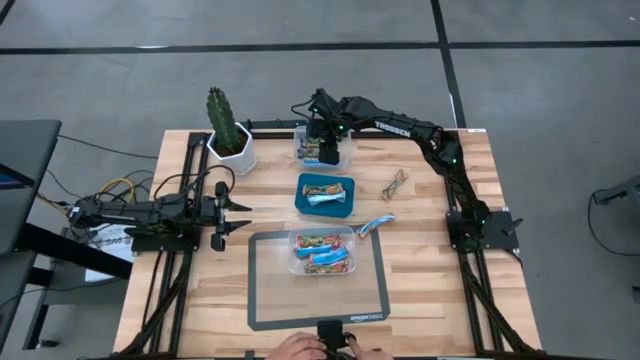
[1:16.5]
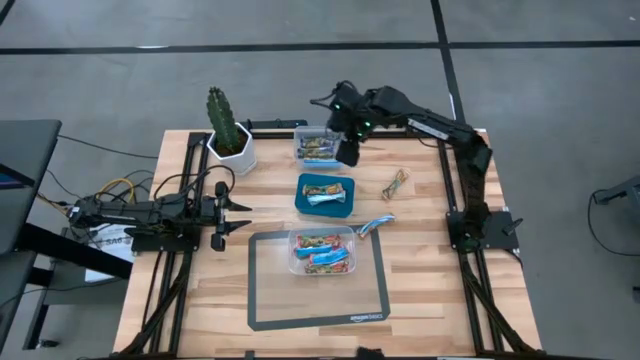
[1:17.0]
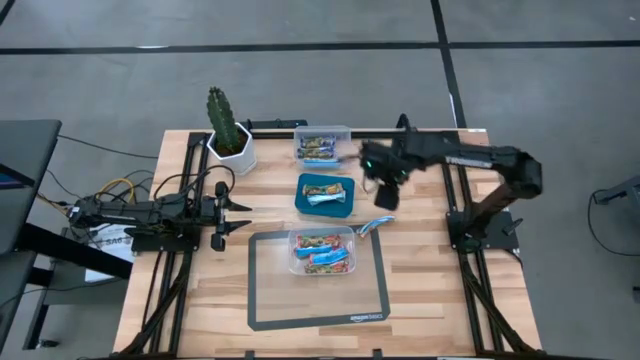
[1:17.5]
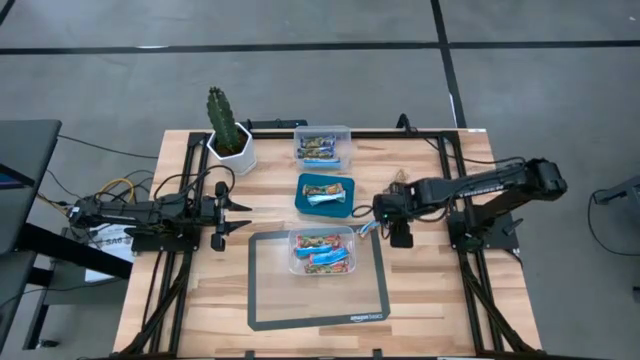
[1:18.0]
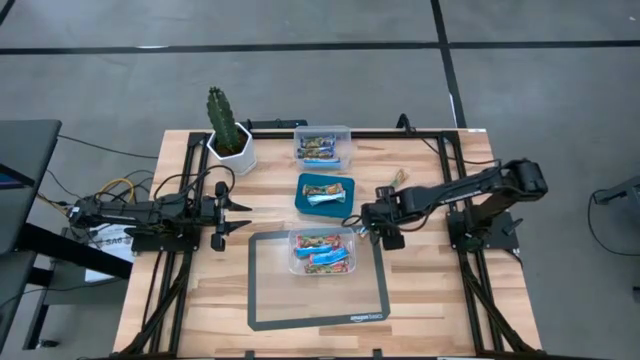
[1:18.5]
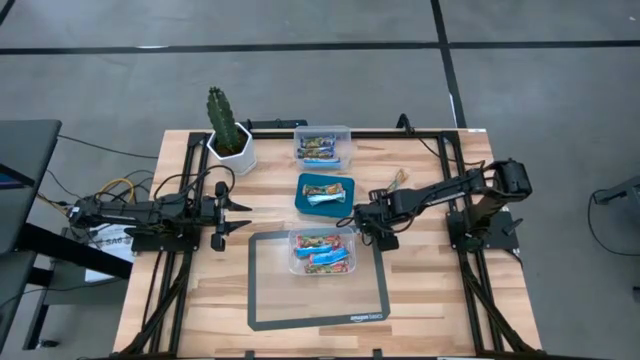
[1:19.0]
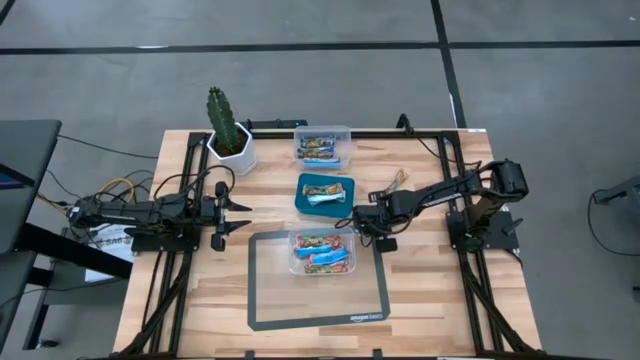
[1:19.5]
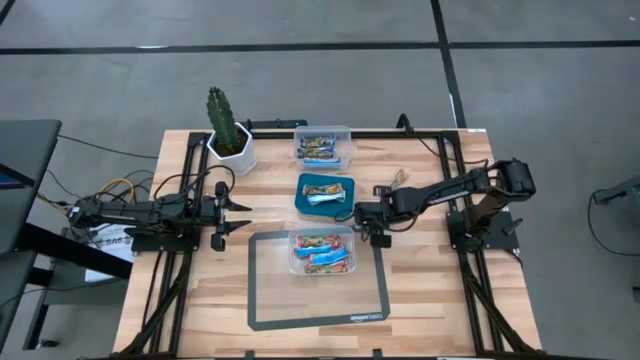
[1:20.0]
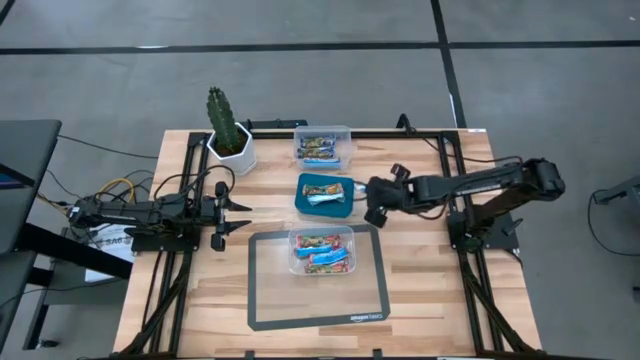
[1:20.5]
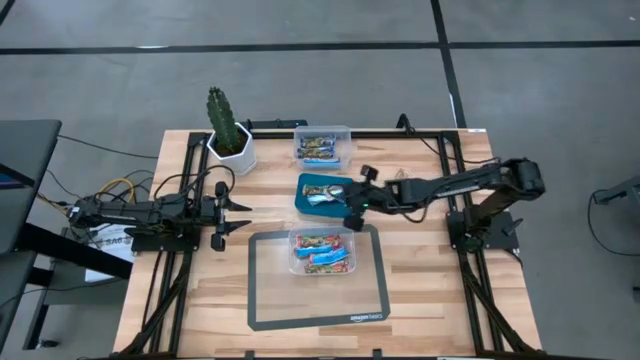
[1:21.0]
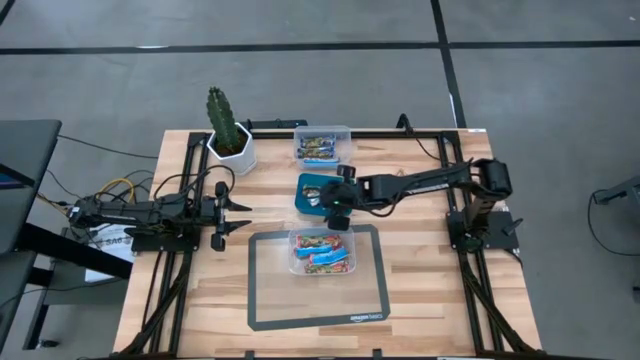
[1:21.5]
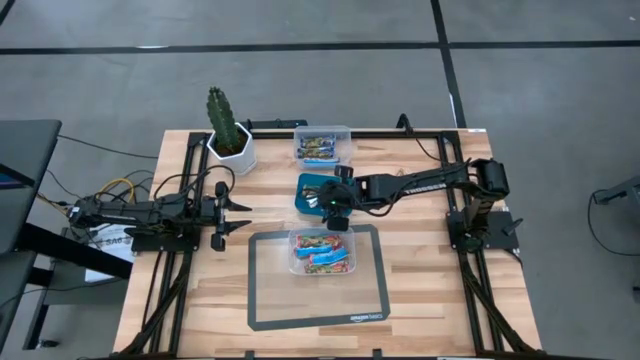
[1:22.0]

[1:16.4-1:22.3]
Task: Pick and place Granola Bars by type
Put the yellow granola bar into the blue bin

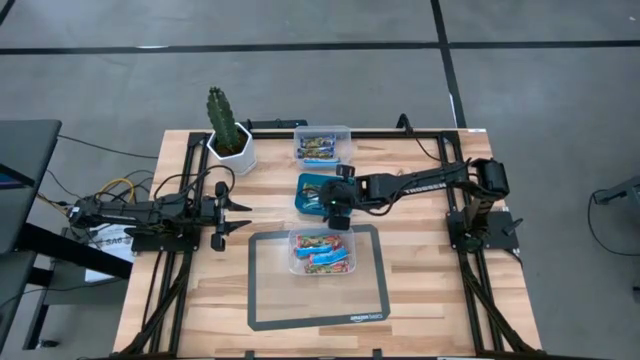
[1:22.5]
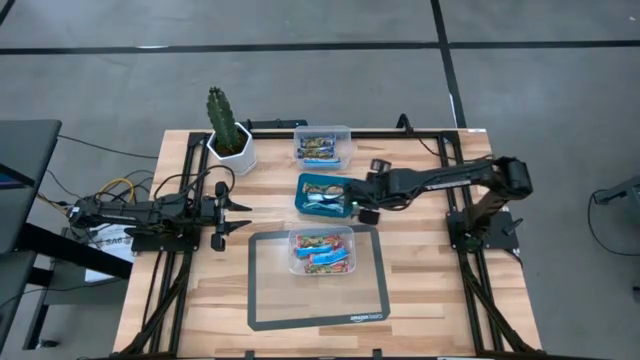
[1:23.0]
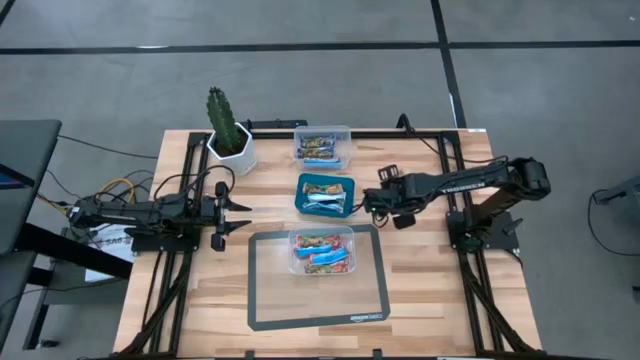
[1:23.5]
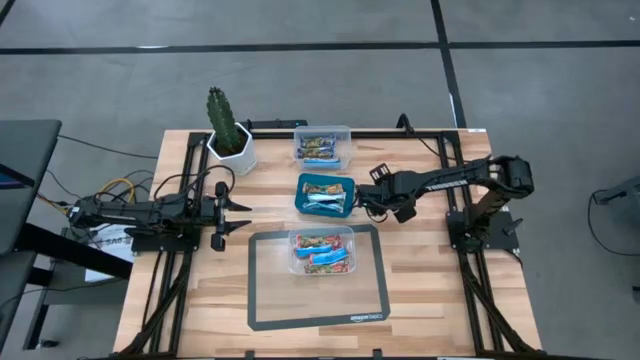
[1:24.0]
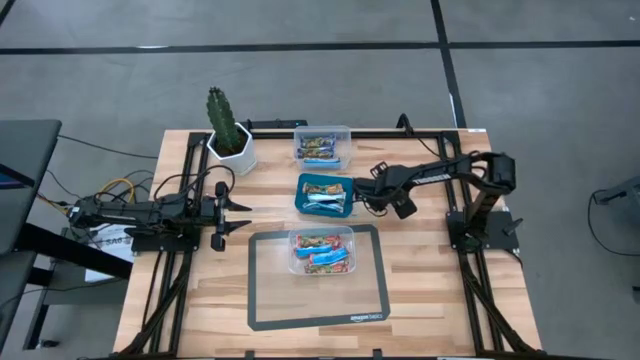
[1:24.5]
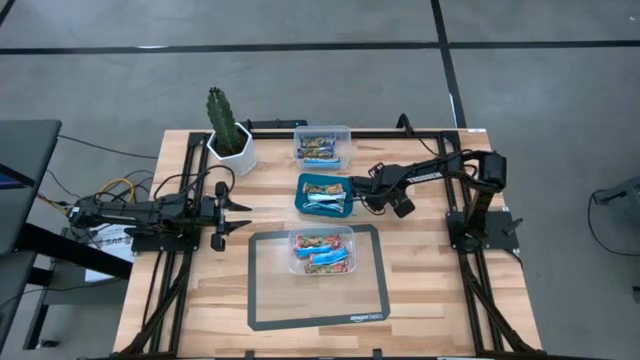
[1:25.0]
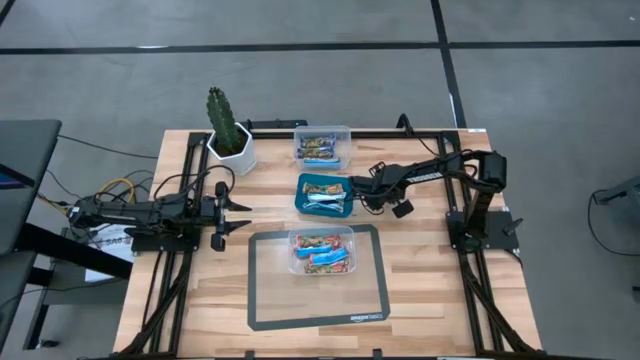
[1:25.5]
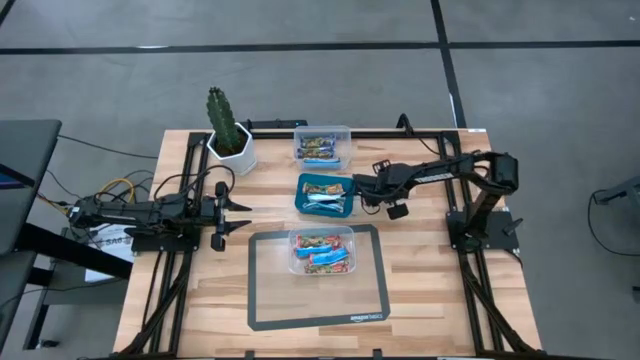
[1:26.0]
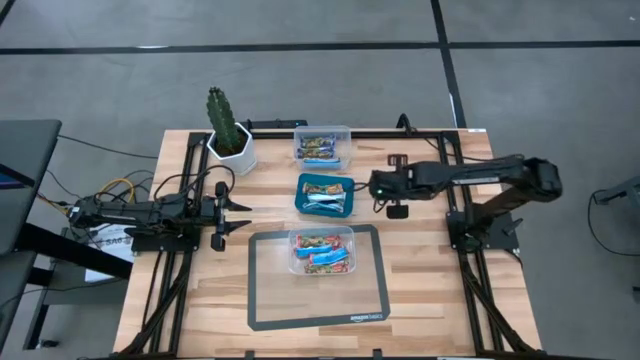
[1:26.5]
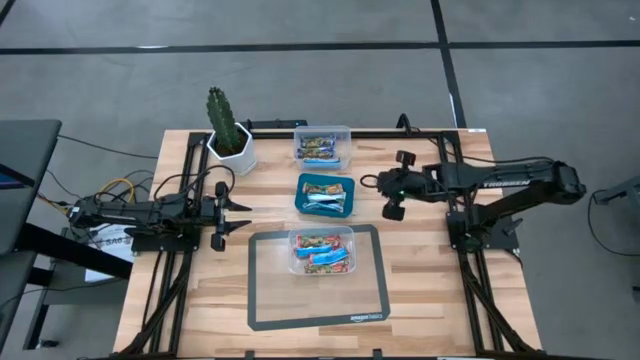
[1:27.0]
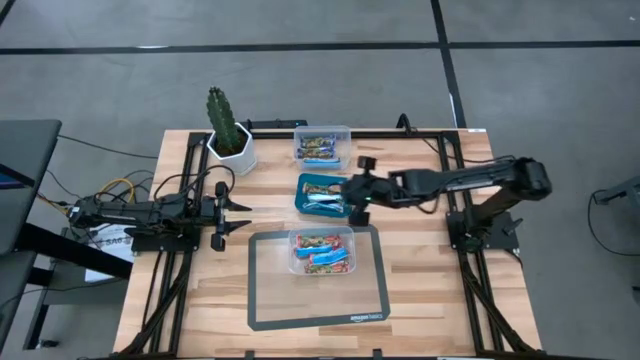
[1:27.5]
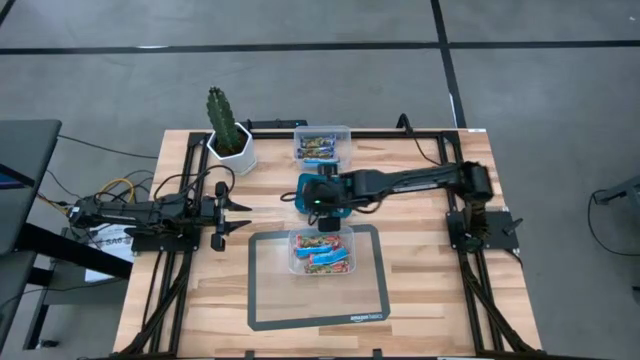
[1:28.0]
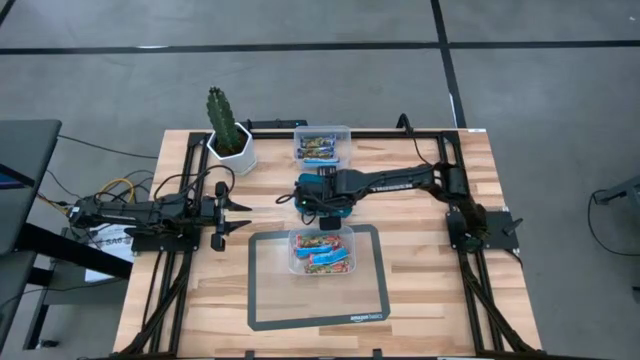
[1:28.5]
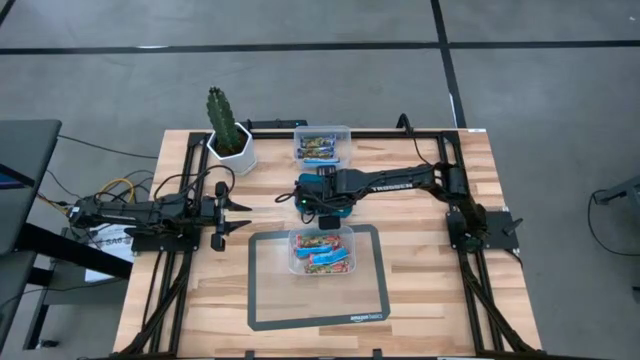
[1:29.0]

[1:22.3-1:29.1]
Put the yellow granola bar into the blue bin

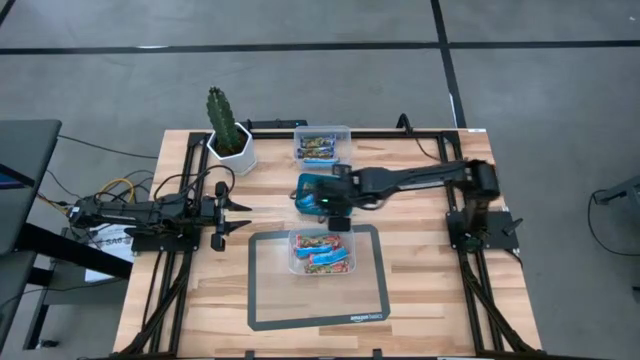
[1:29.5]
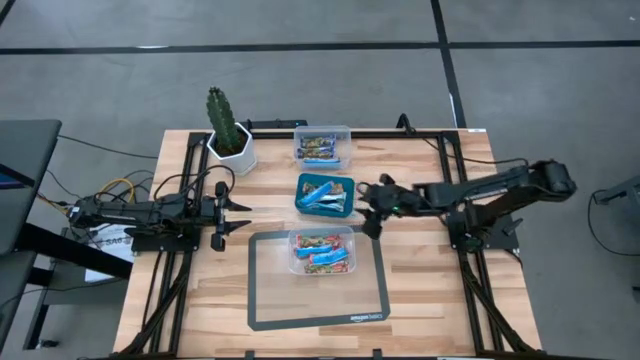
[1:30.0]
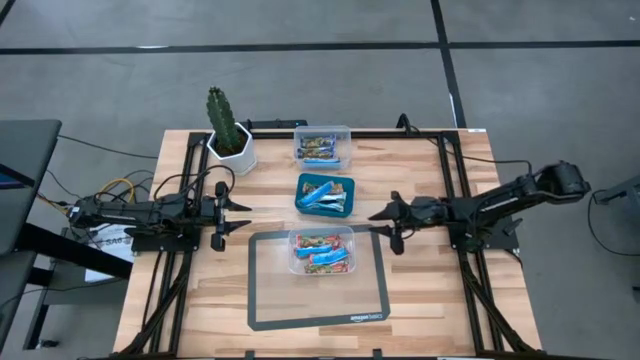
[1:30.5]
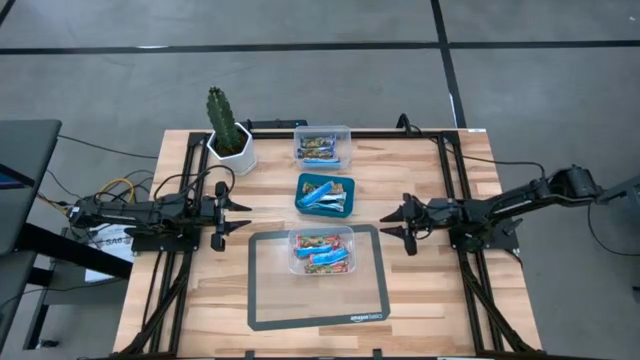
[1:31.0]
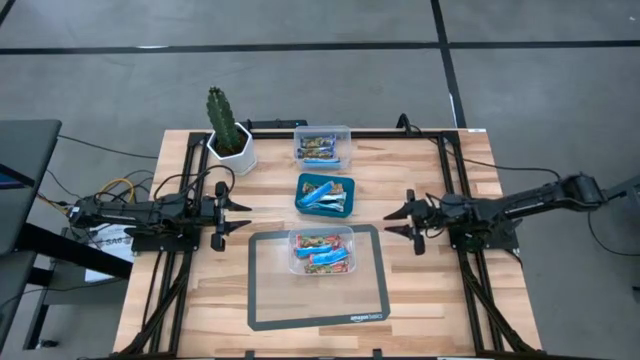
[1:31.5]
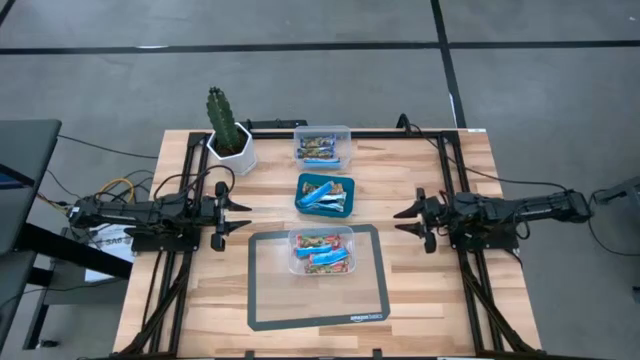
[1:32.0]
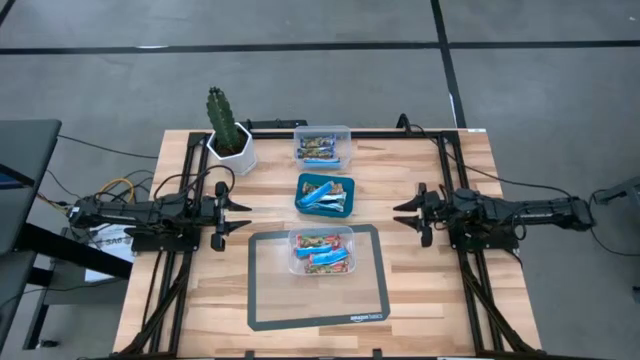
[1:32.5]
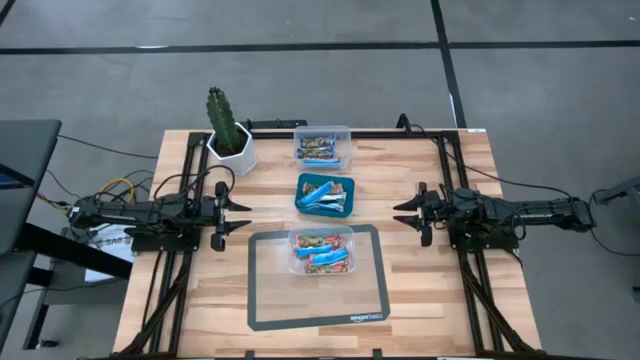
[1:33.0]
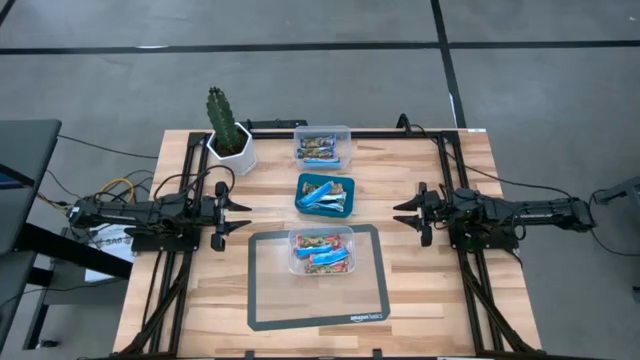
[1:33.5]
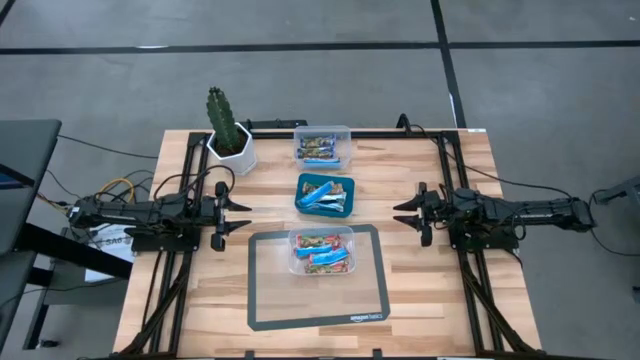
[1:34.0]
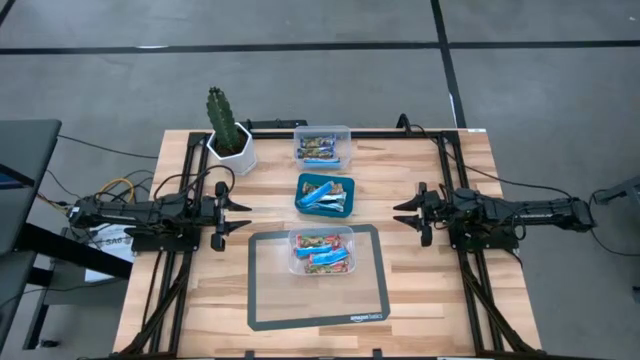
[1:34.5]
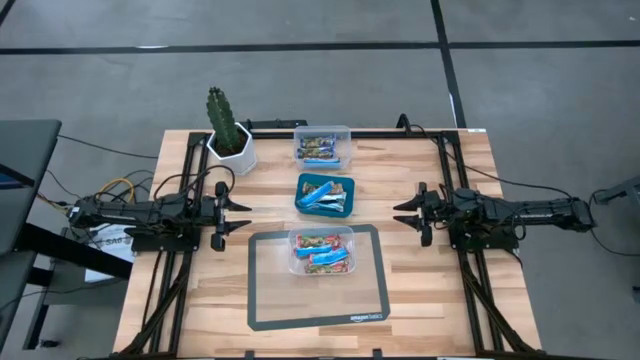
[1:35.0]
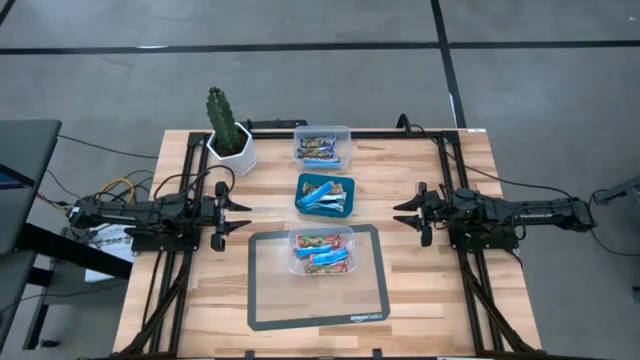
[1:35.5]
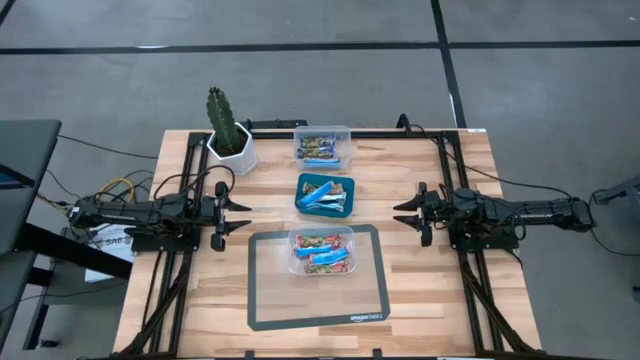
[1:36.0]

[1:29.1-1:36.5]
Return to home position

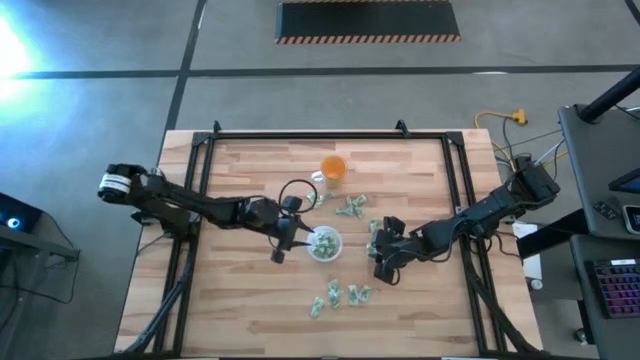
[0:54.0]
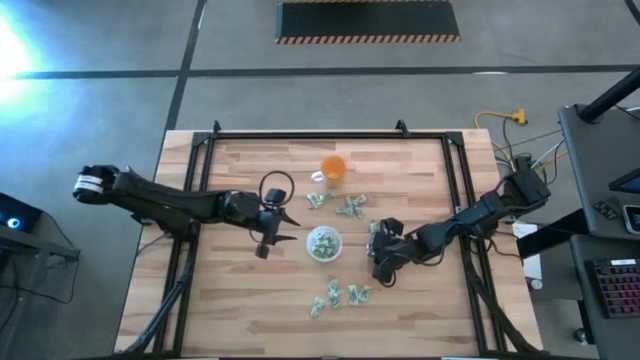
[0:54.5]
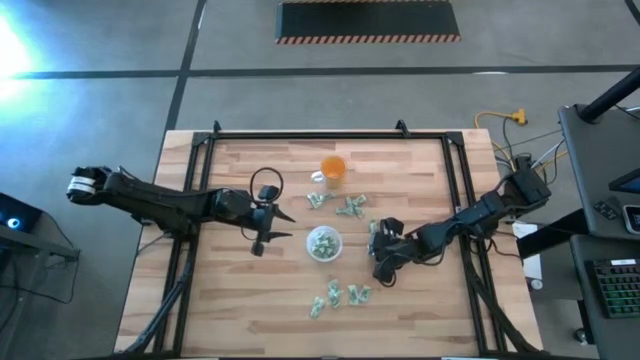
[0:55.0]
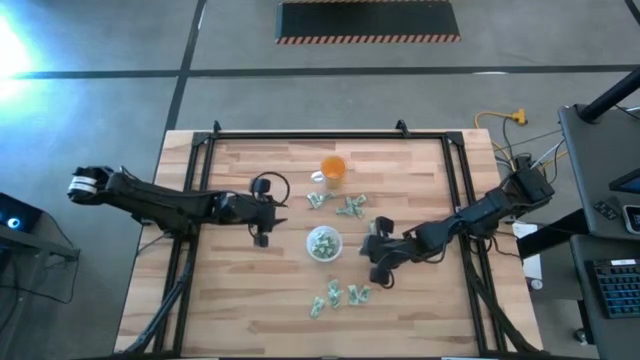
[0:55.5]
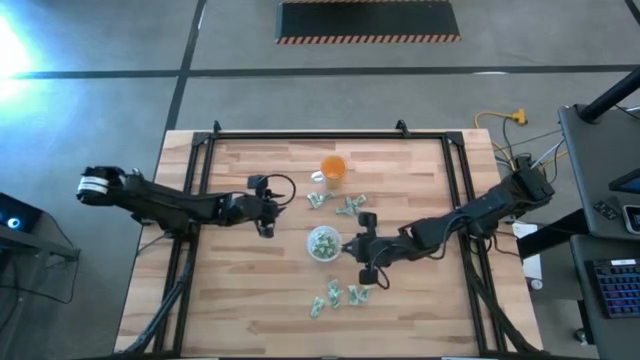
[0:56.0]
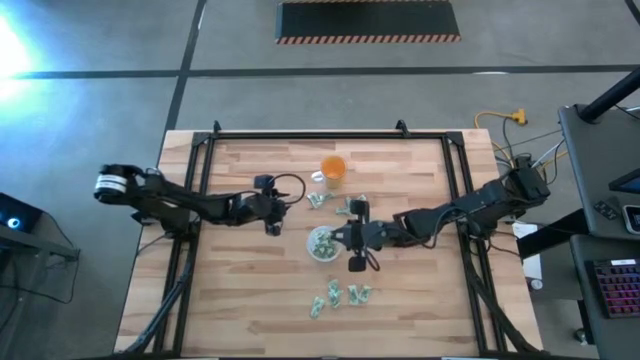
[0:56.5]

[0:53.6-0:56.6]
Task: Pick and place Stevia / Truvia into bins
Put the green stevia packet into the transparent container
